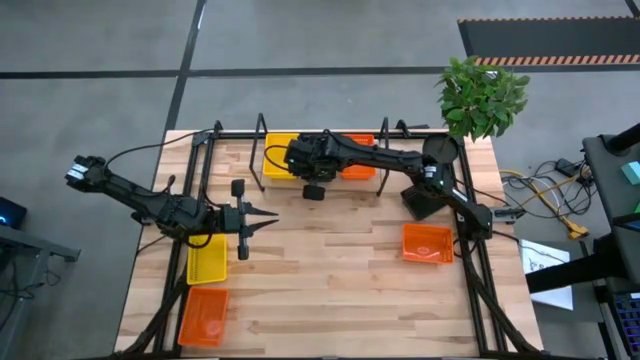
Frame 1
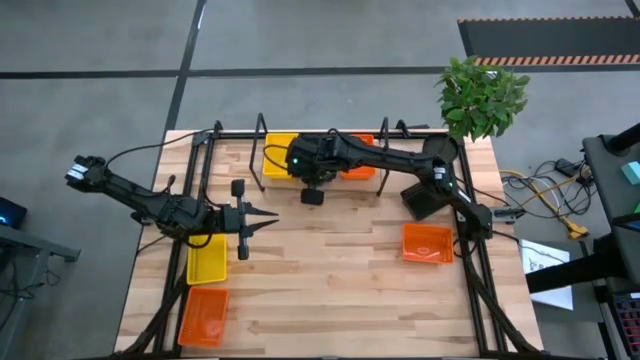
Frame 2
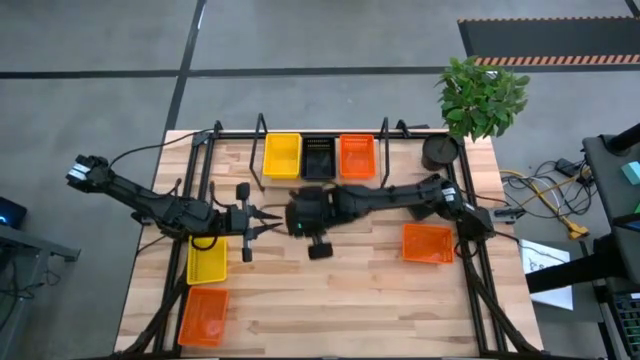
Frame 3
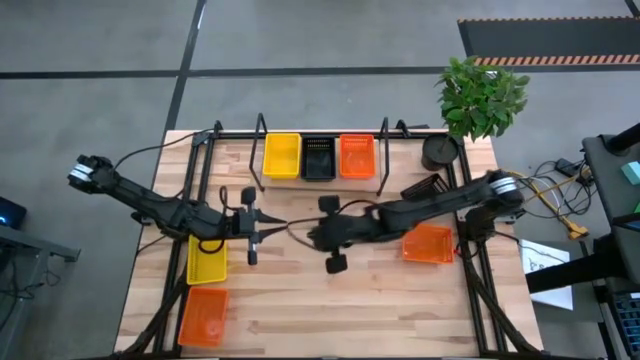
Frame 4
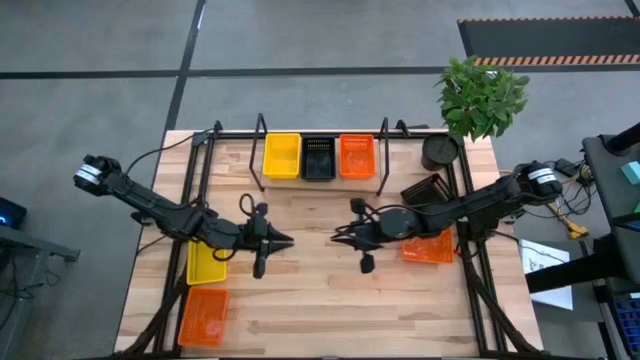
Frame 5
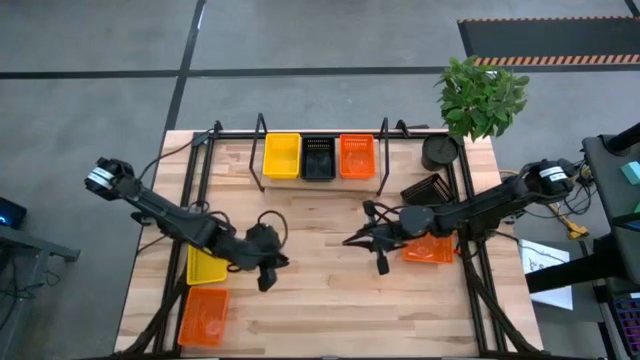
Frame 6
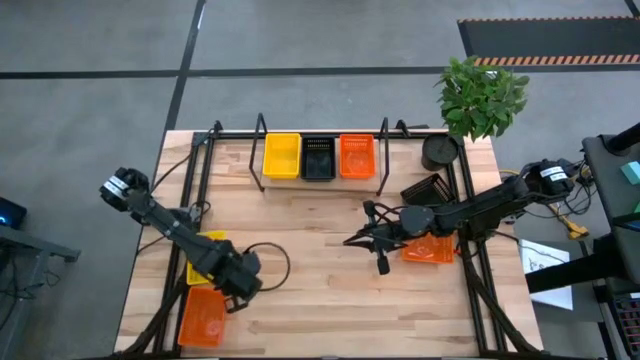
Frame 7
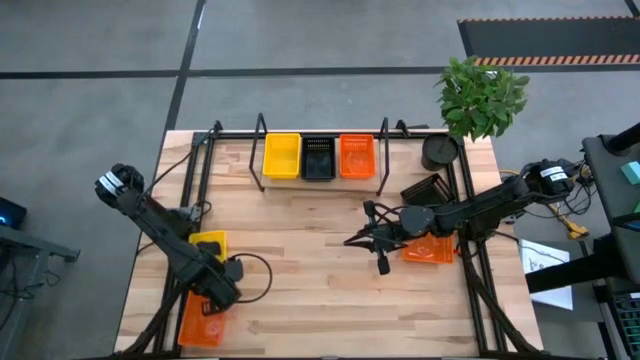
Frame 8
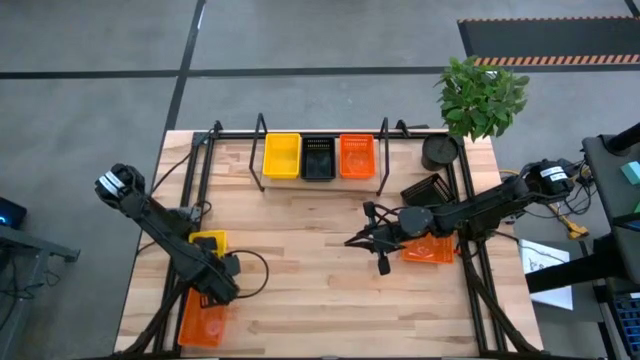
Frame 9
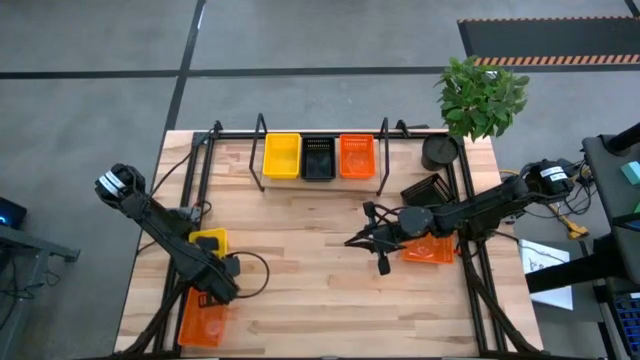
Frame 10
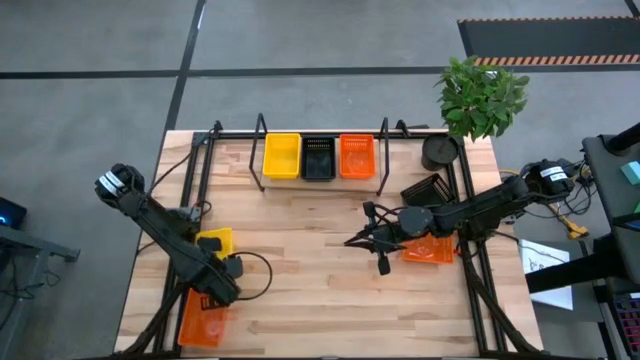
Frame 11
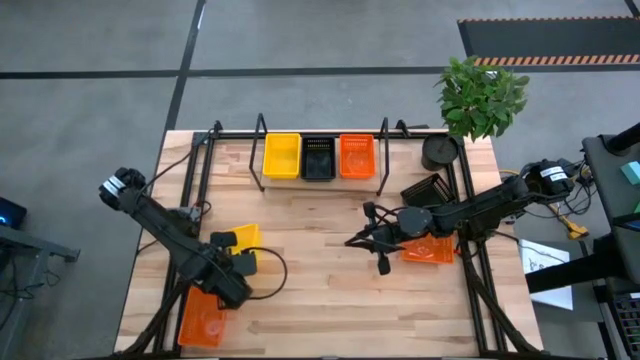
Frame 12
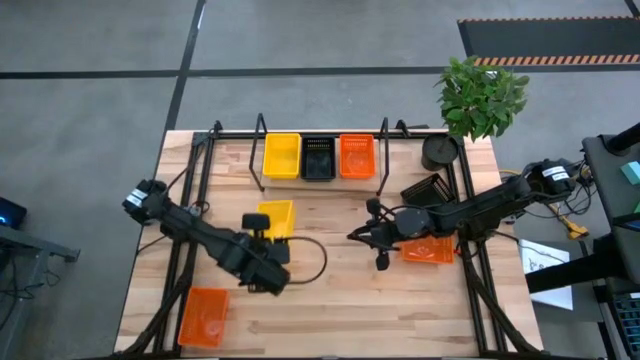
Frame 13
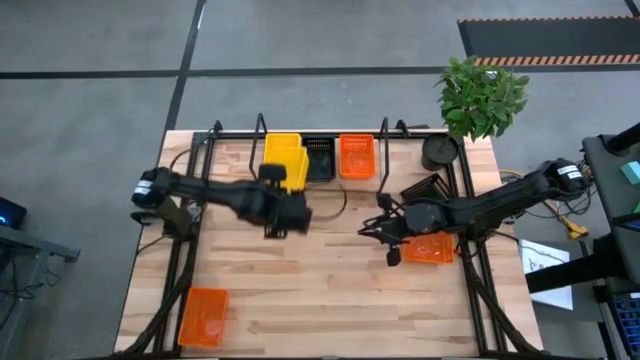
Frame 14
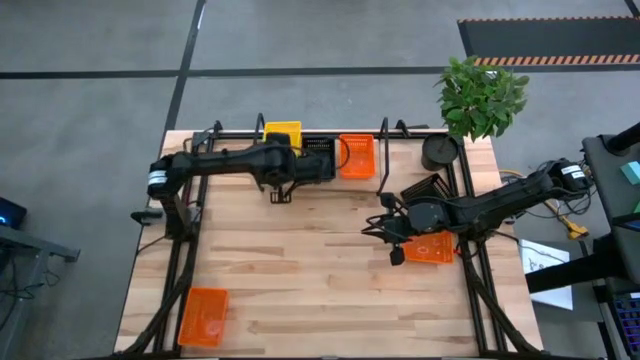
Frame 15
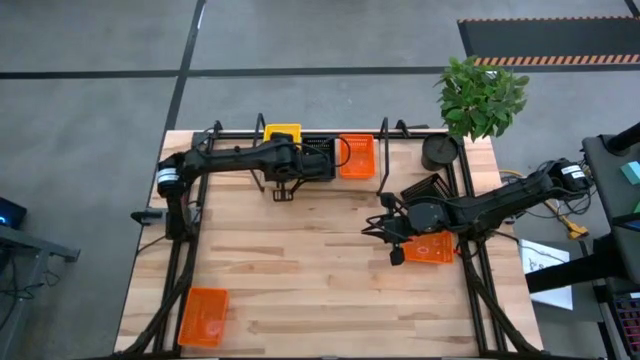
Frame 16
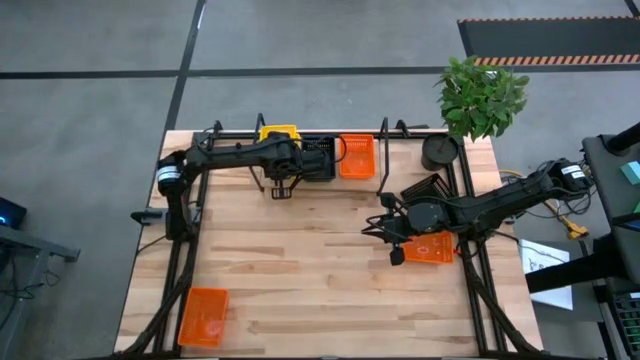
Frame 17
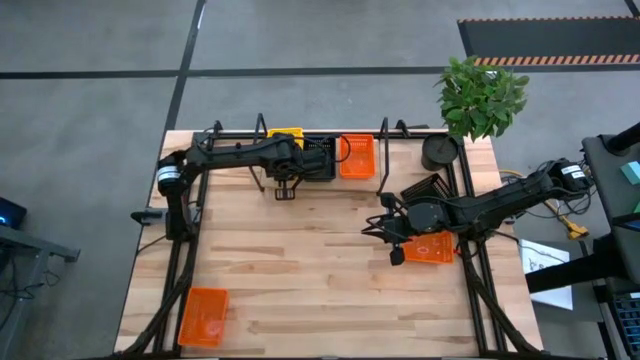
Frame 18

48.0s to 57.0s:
Task: Stack baskets on shelf by color
Stack the yellow bin on top of the other stacked yellow bins on the shelf

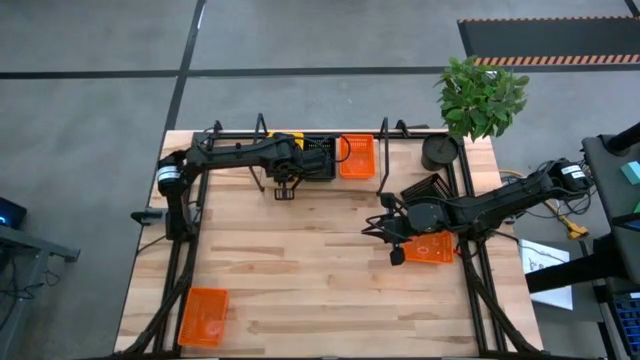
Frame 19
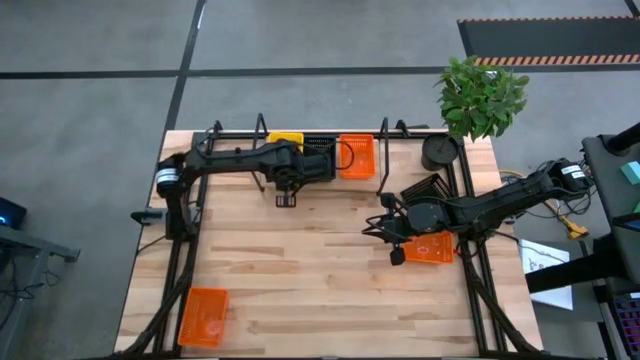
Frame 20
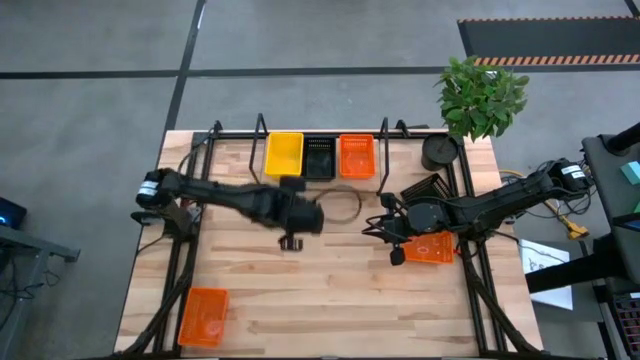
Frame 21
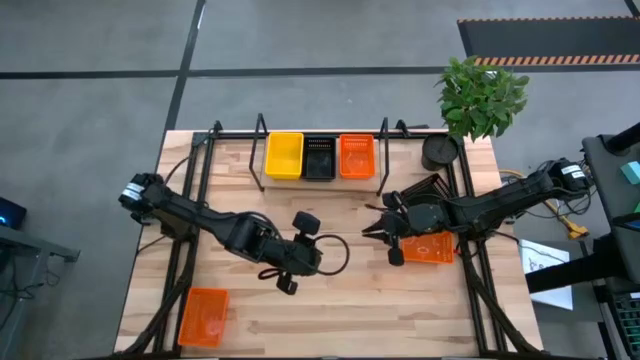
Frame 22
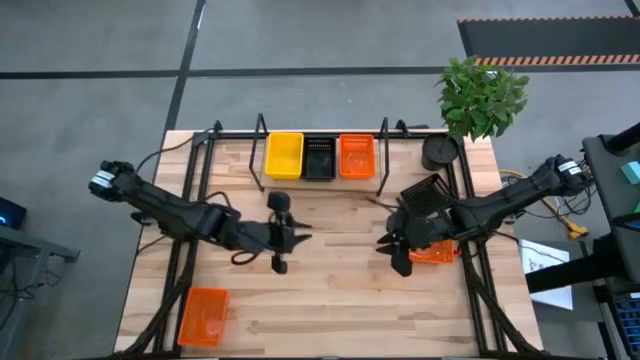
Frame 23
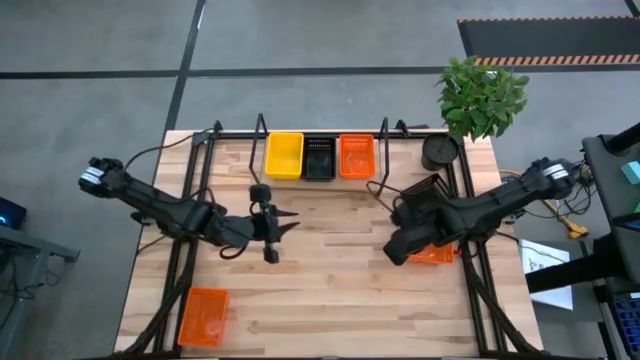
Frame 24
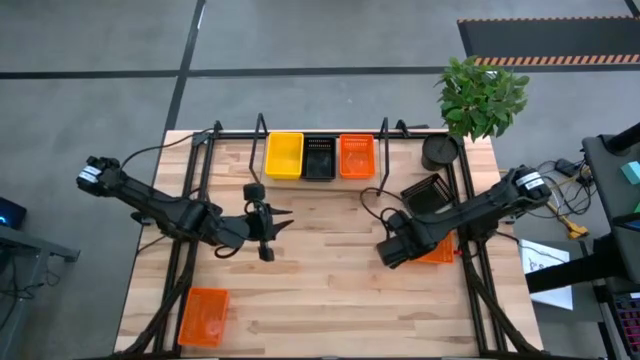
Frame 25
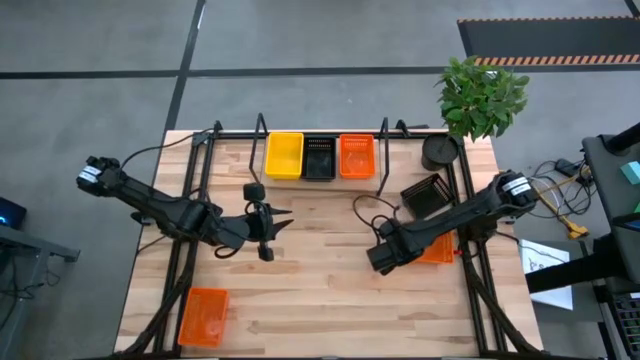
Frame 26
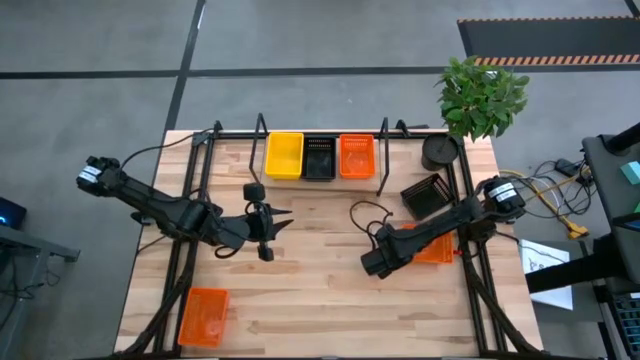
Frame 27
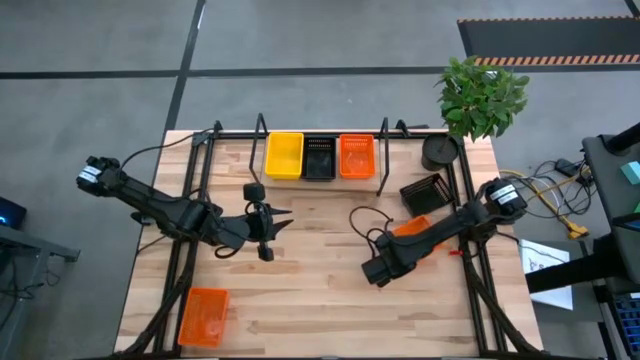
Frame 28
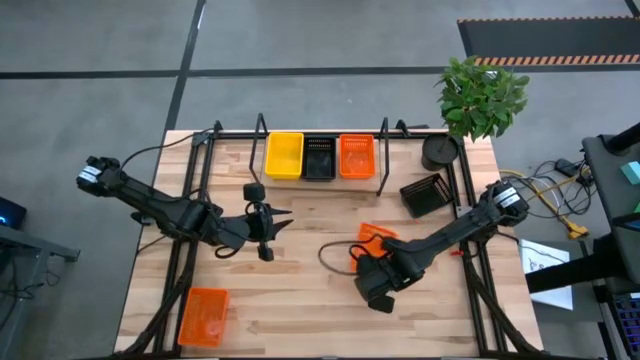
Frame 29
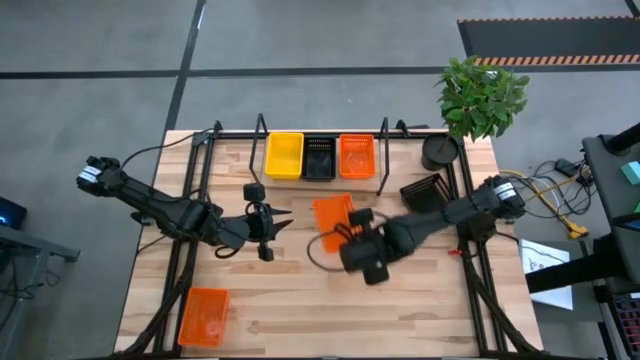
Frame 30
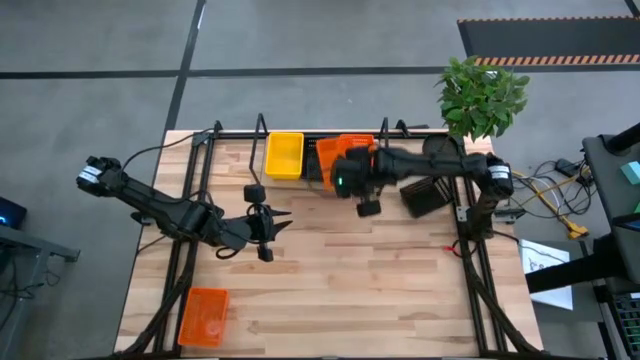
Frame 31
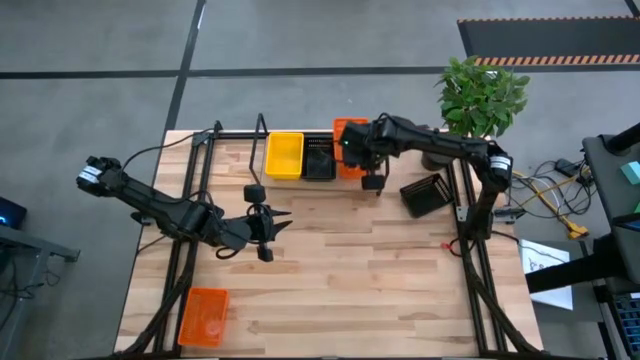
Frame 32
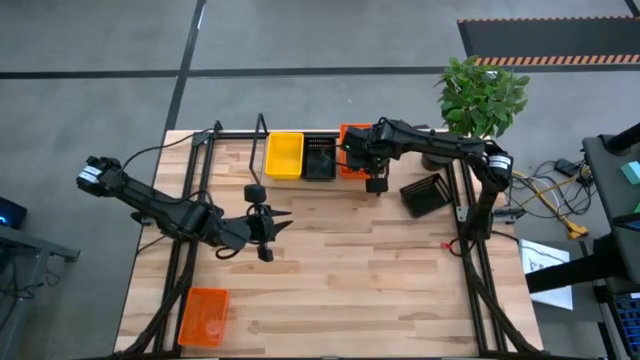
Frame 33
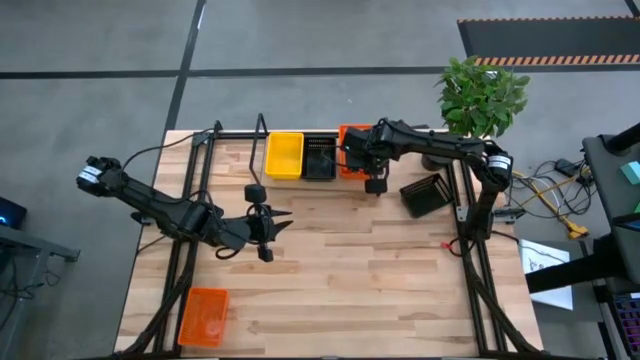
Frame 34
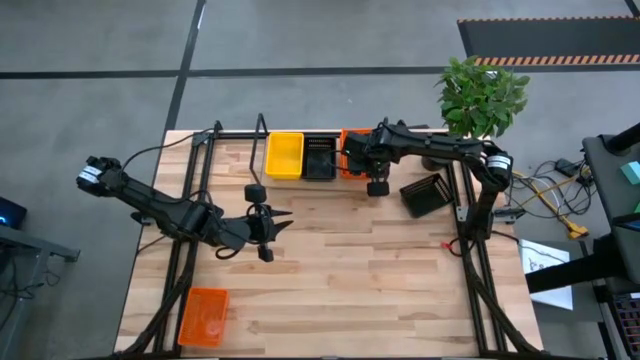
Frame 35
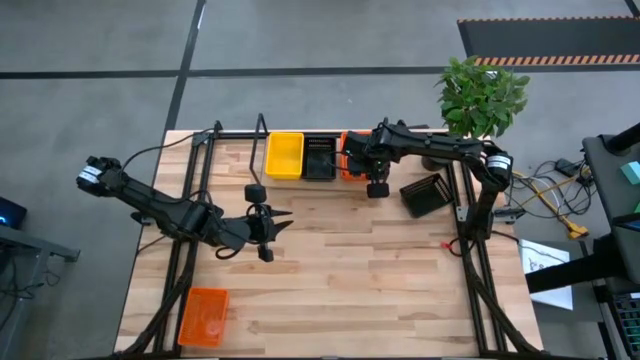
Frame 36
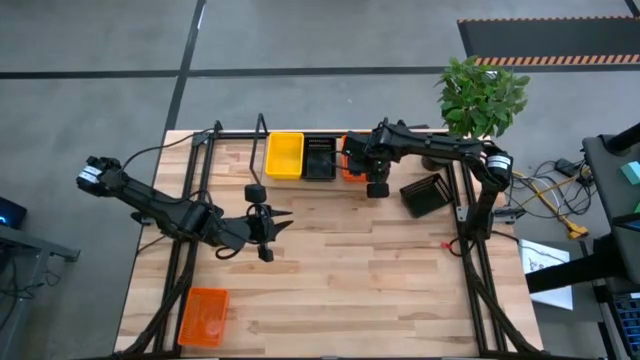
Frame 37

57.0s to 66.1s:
Stack the top orange bin on top of the other orange bin on the shelf

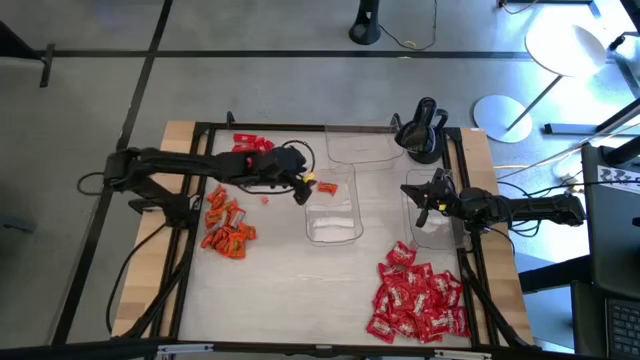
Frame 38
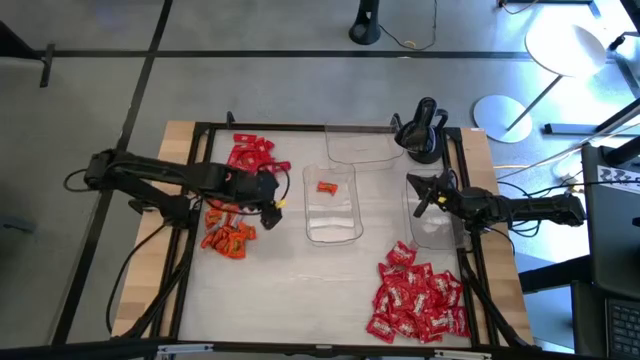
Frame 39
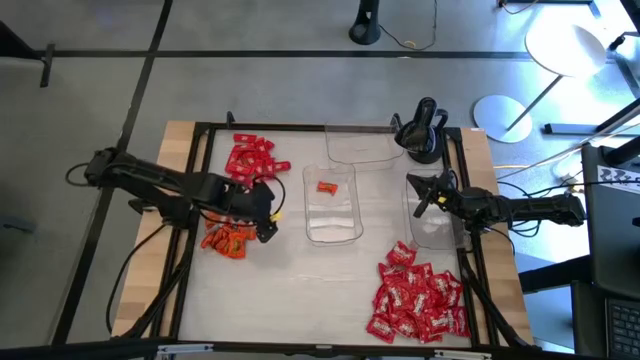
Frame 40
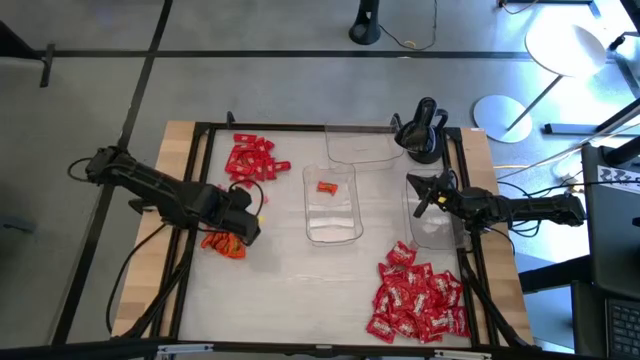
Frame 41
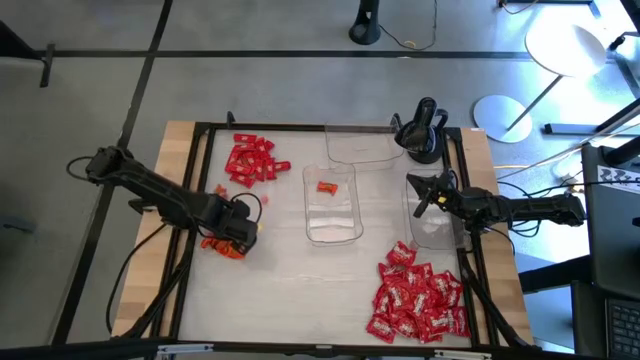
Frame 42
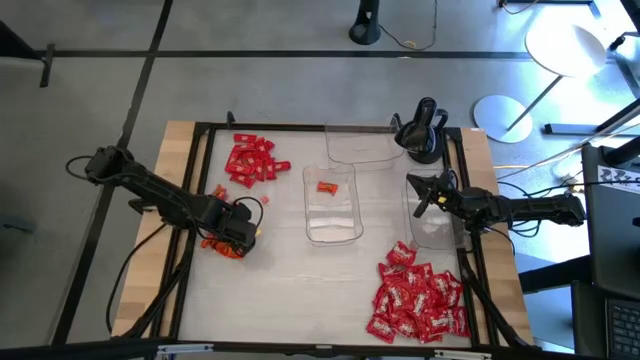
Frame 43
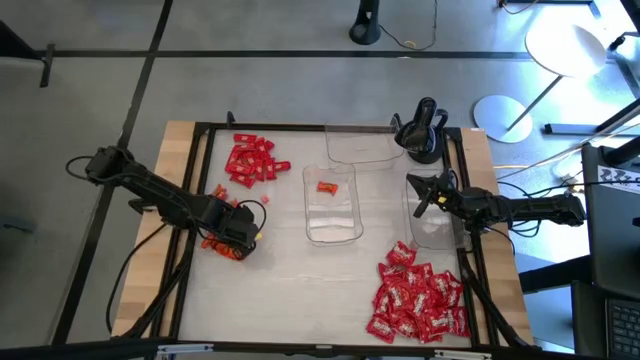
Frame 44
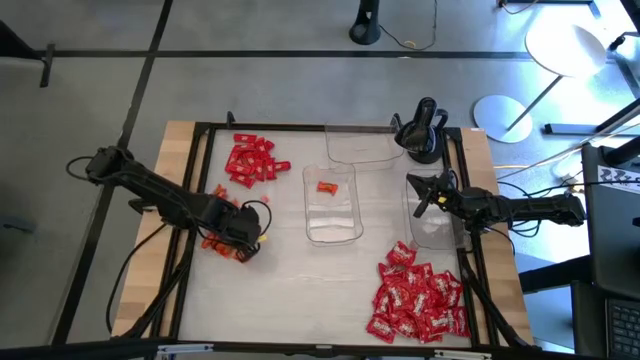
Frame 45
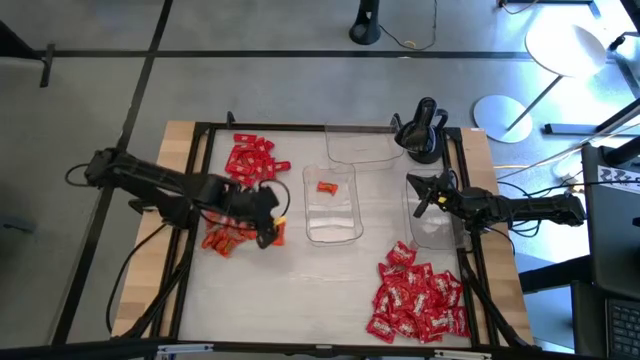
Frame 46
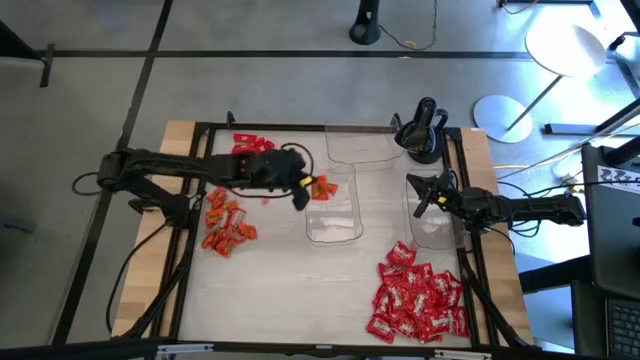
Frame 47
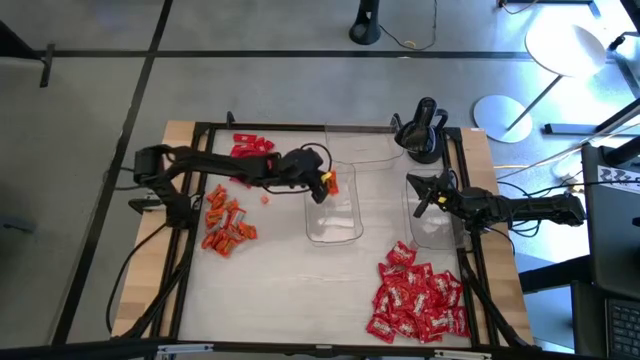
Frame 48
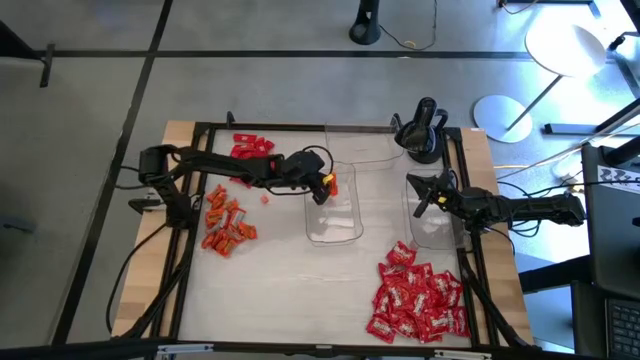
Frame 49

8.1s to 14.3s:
Task: Sort candy
Put the orange chocolate into the bottom left transparent bin
